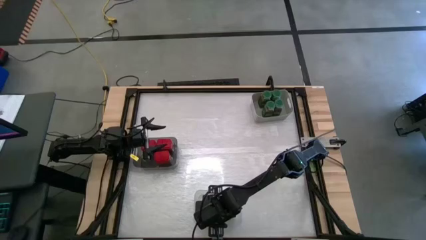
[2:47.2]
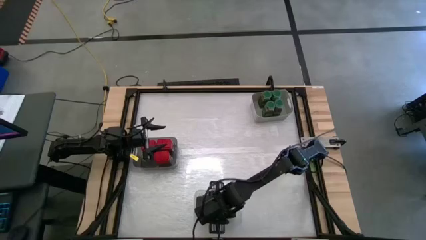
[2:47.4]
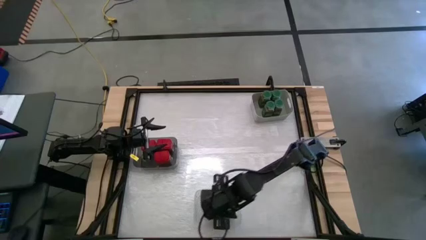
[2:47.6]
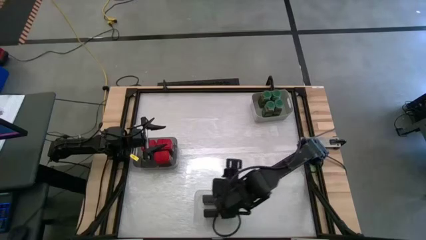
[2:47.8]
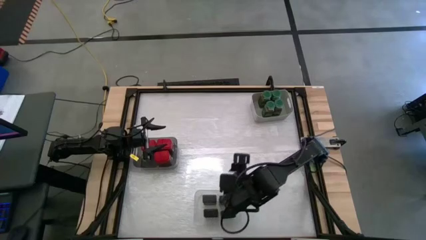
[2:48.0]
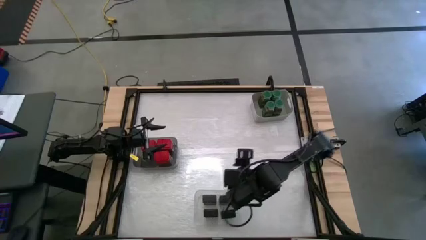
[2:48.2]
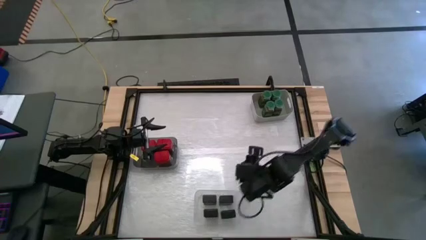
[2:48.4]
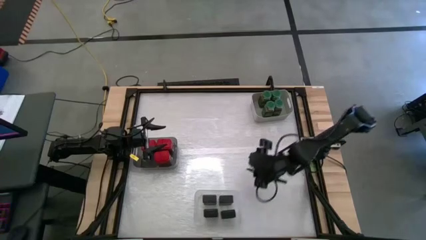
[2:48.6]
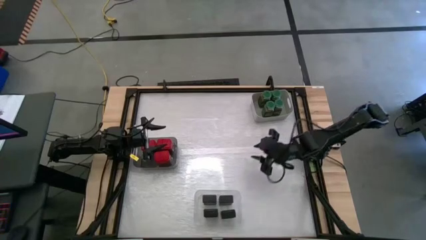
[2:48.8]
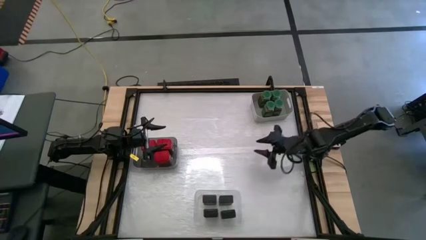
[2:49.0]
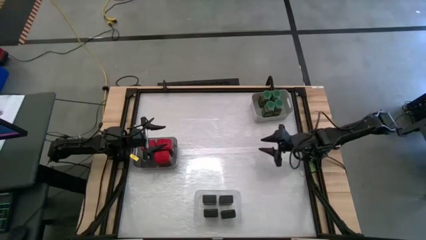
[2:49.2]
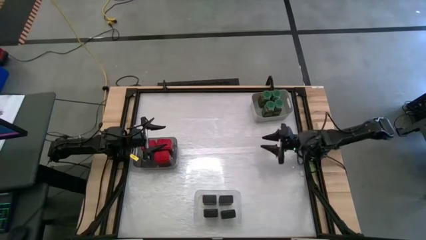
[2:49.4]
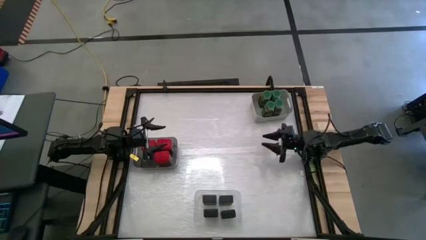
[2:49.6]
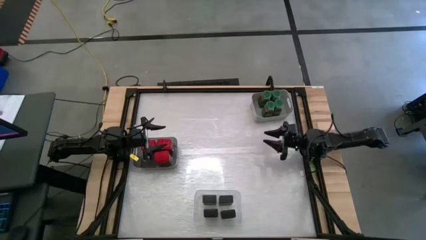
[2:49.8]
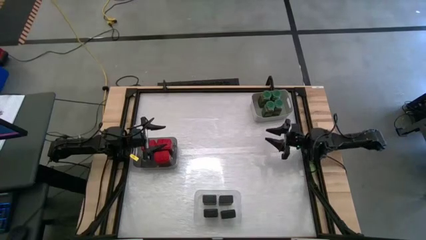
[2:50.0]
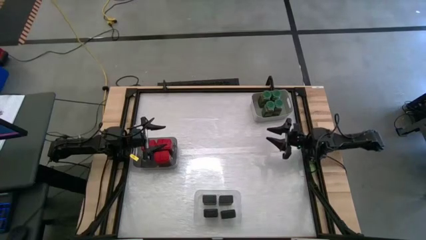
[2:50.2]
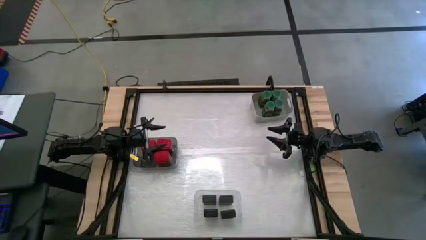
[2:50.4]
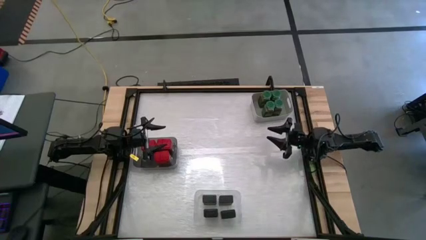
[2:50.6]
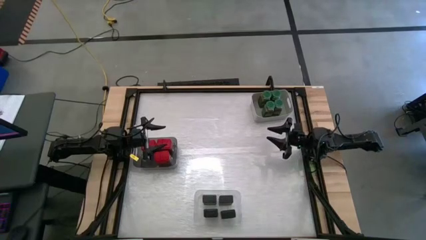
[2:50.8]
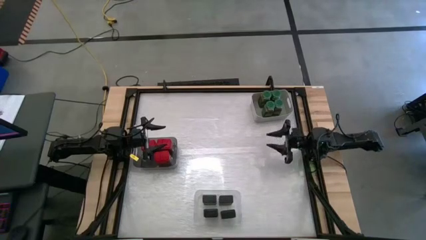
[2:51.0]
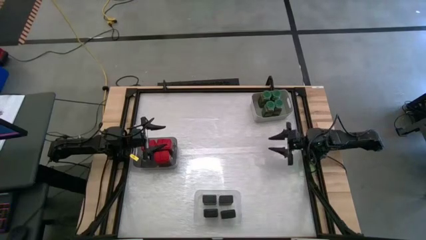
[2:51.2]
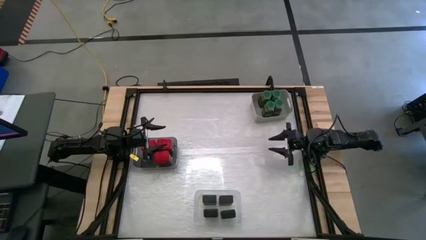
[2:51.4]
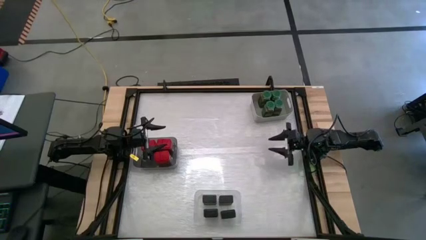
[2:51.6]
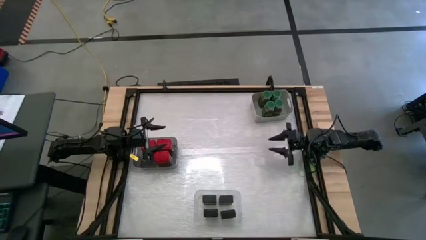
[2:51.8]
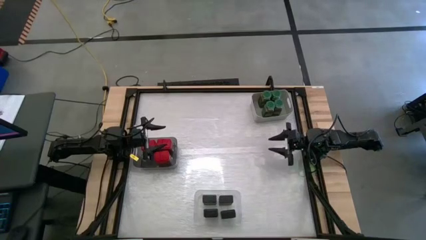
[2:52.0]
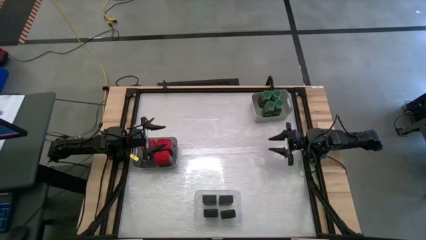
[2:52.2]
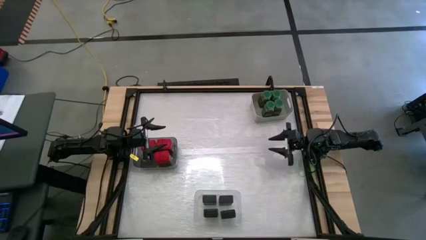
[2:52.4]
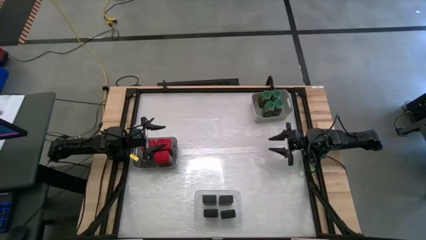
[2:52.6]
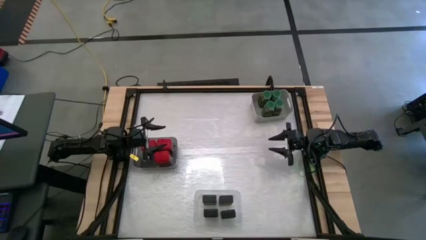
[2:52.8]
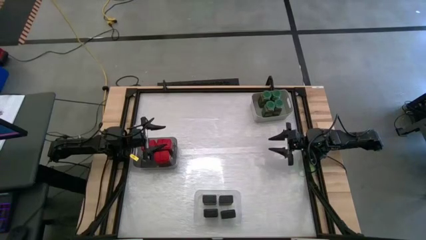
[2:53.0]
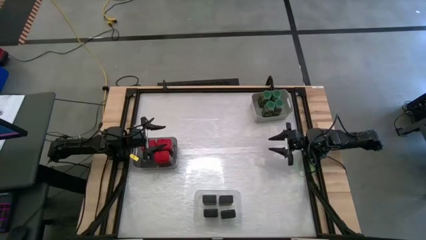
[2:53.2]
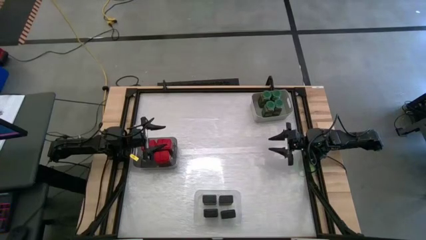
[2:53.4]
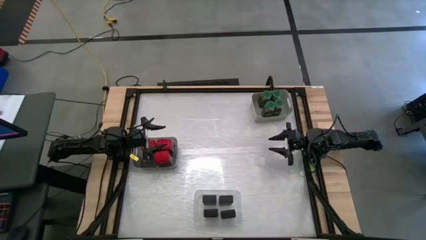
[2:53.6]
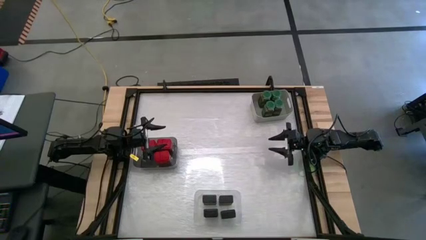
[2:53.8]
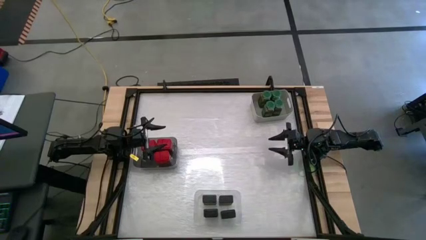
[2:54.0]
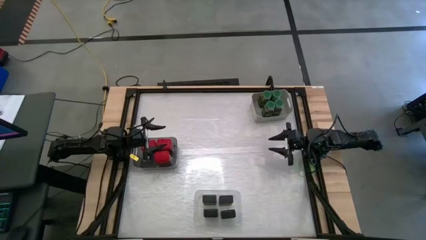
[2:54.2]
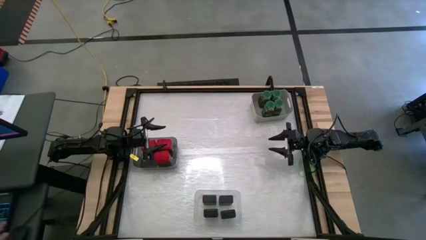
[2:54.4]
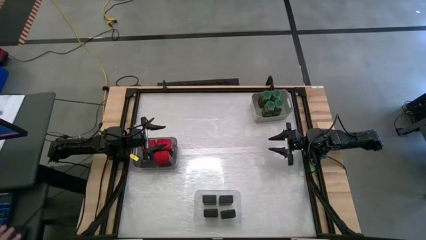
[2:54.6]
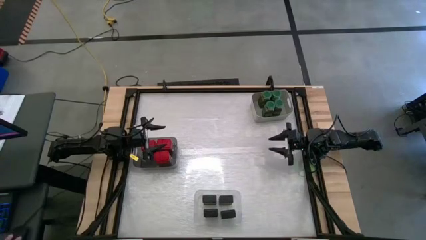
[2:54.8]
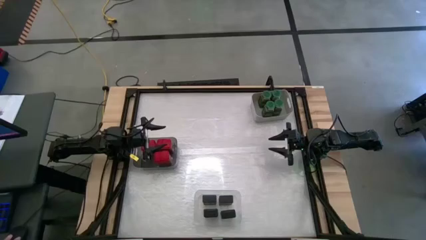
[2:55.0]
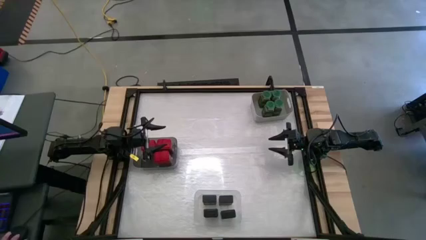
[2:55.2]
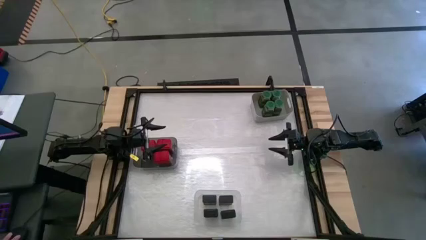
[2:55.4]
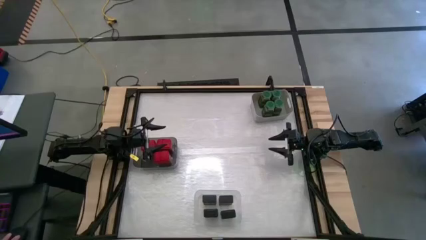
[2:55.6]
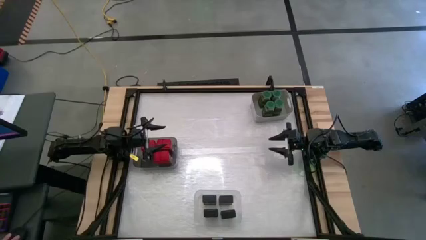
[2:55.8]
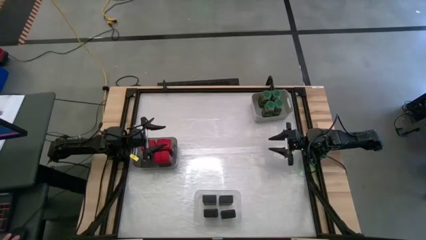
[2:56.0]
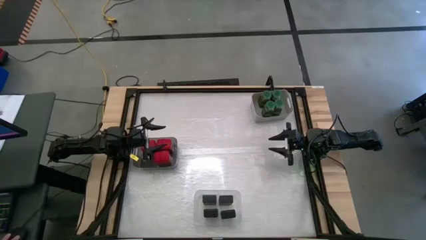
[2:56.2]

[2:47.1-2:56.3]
Task: Sort spices by type
Return to Home Position

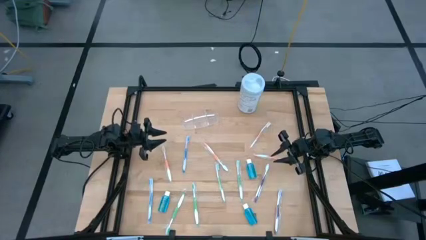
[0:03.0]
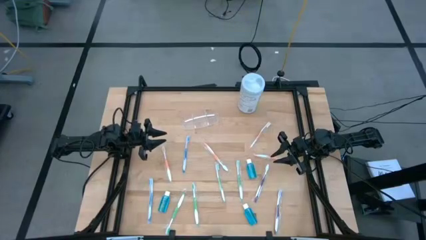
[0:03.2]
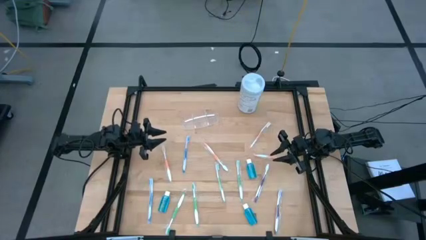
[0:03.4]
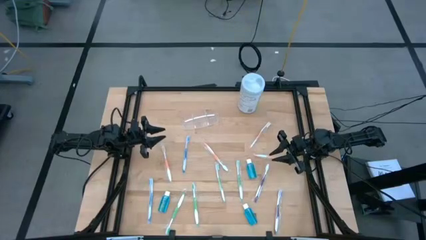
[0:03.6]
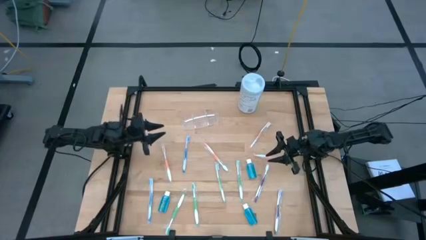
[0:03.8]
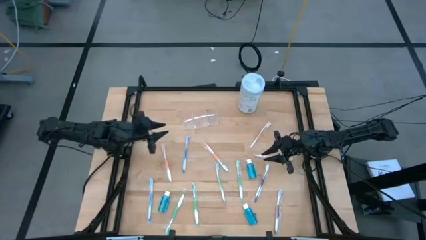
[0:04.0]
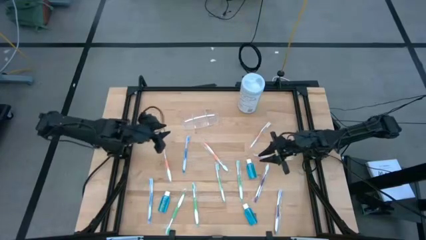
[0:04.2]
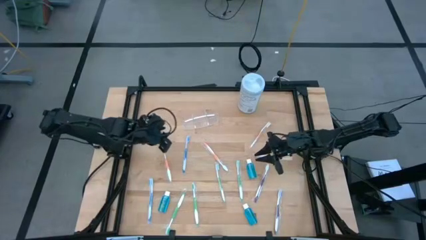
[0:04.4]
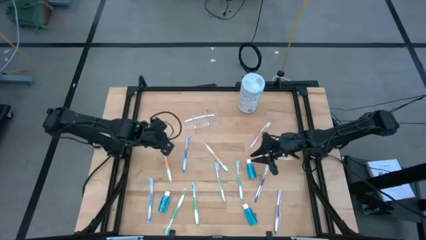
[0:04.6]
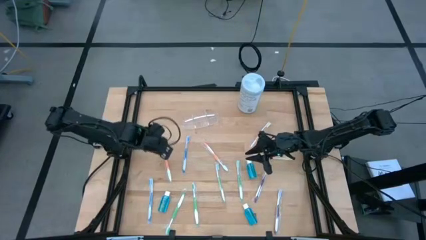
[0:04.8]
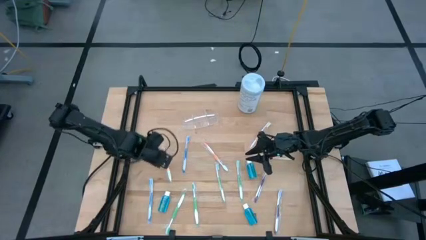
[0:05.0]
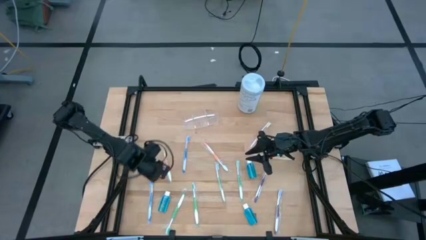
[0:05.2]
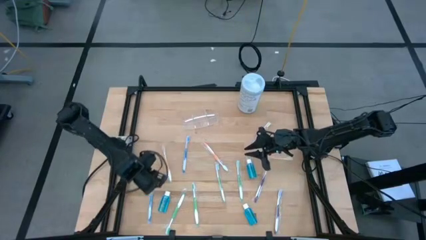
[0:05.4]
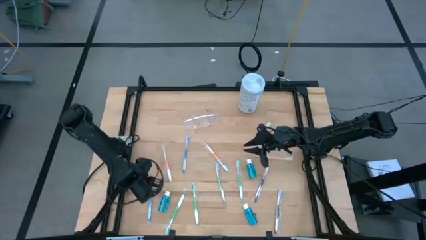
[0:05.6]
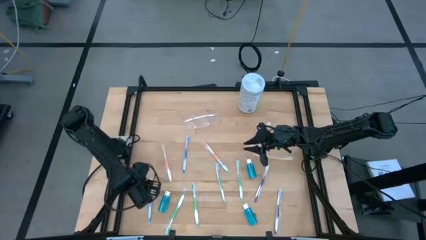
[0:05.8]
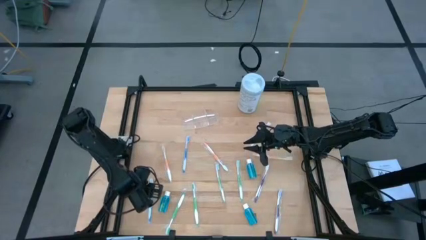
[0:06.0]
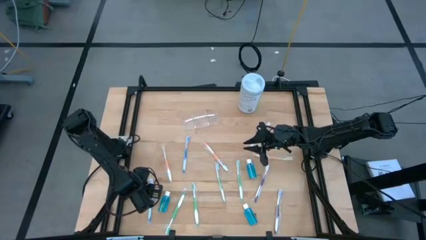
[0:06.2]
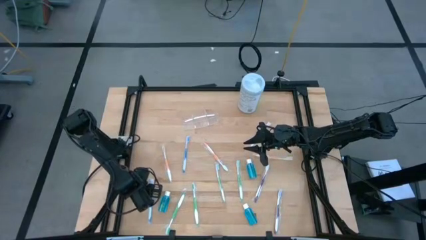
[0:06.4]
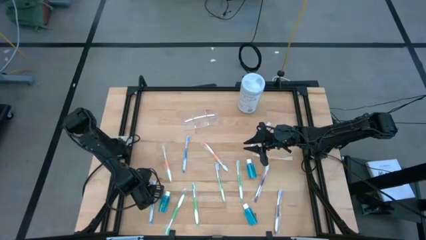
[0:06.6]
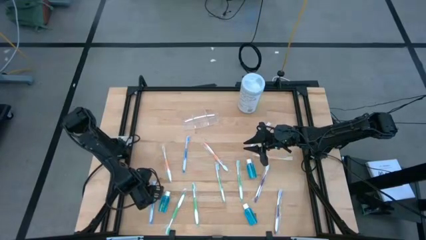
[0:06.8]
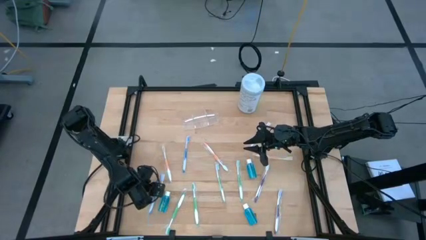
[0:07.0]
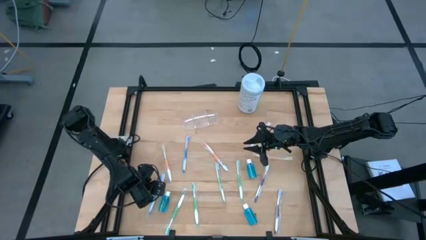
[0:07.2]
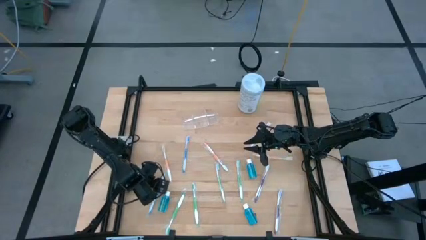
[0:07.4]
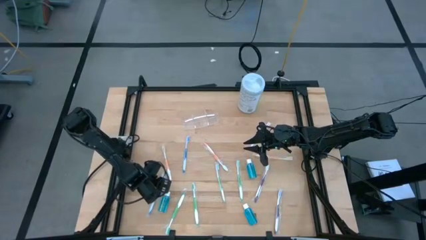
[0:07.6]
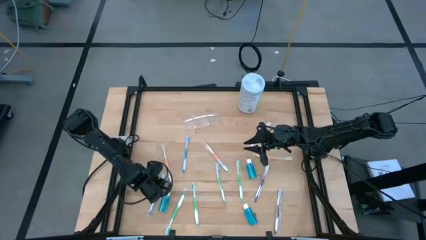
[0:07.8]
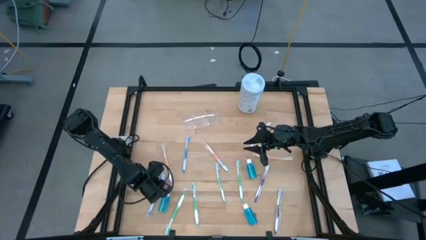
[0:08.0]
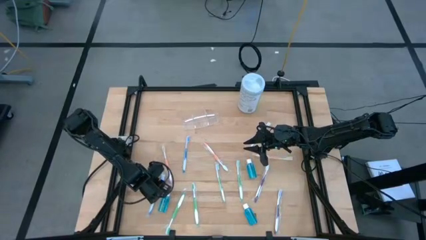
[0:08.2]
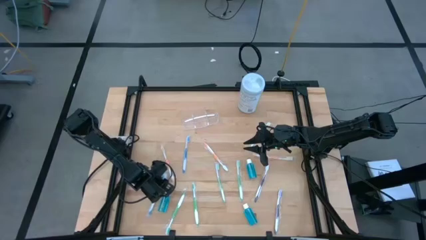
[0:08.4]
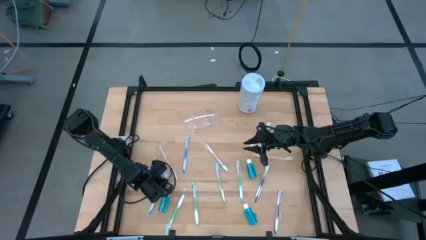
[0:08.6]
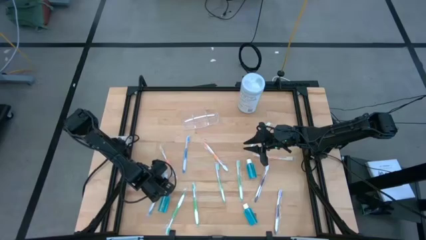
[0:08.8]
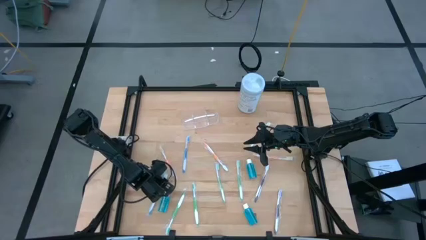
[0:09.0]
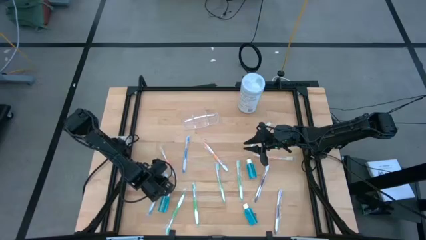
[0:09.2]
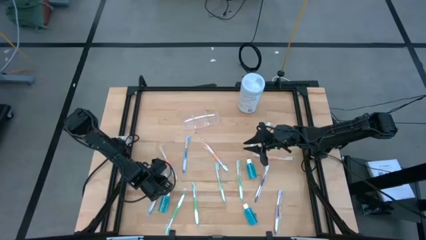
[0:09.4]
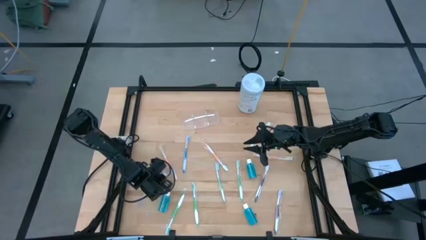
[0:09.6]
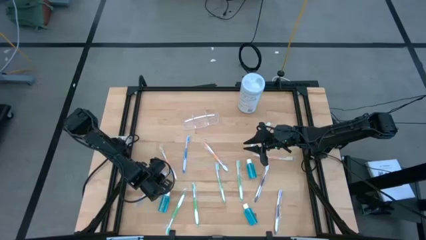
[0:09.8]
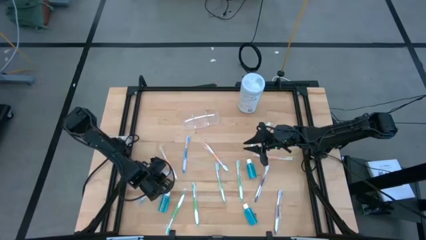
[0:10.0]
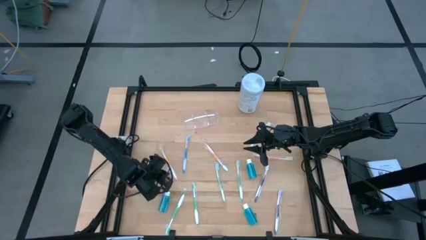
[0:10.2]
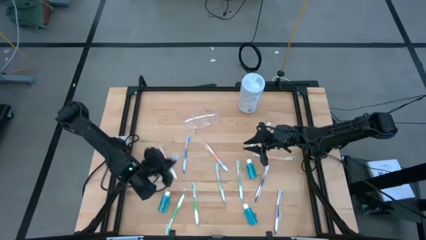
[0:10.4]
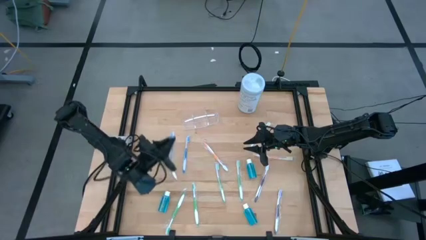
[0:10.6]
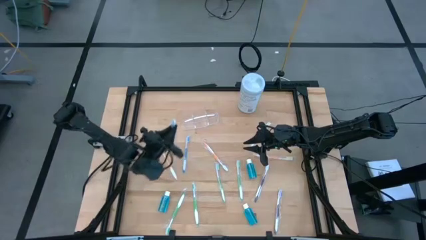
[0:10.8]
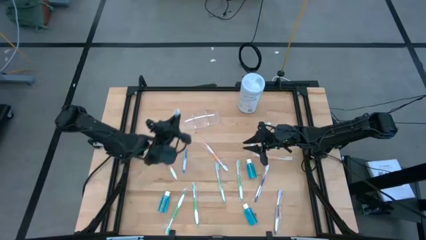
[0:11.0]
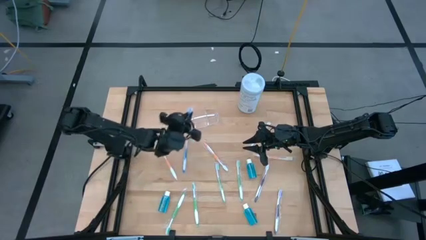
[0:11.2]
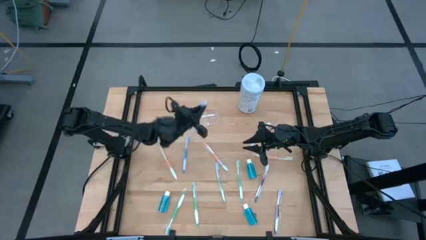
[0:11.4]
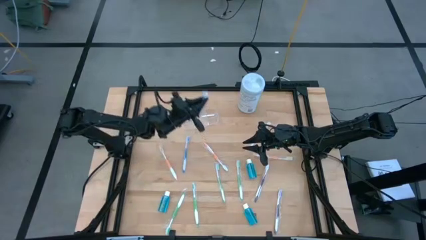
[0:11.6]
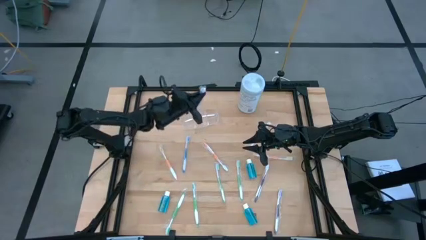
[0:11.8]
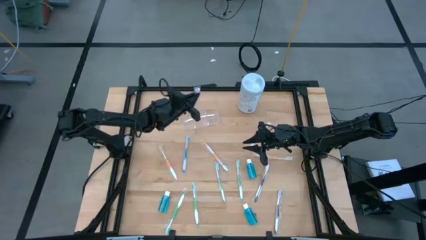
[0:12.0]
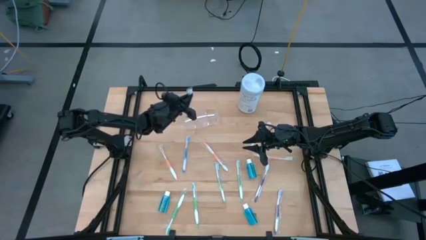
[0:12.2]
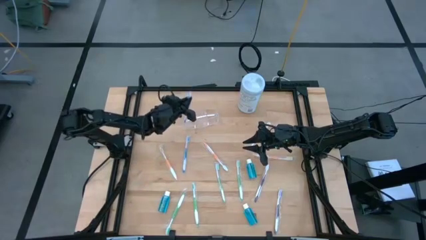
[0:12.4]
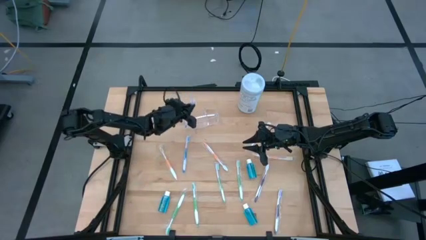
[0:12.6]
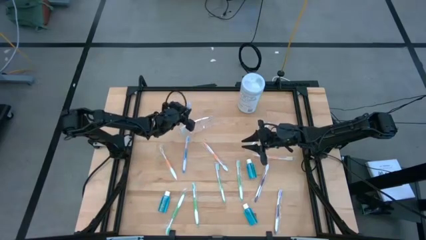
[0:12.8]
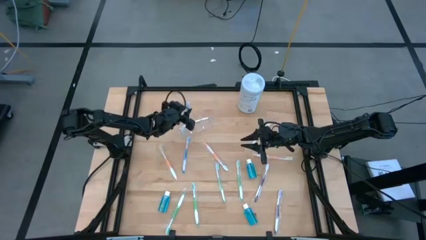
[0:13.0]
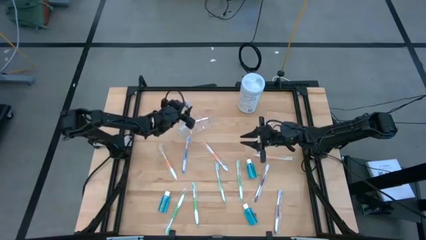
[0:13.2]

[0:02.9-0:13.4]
Task: Pick & Place toothbrushing station
Put the blue toothbrush into the transparent organizer
